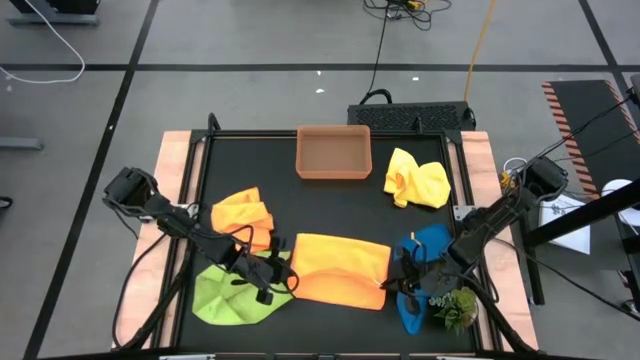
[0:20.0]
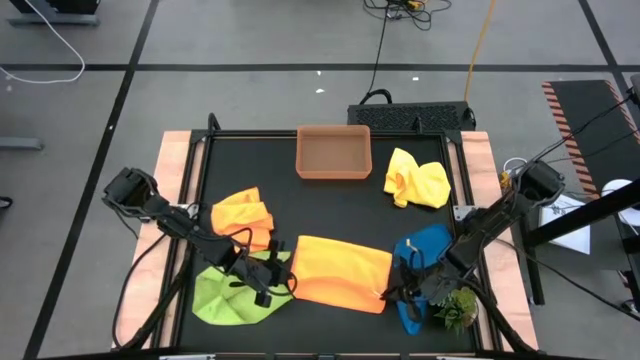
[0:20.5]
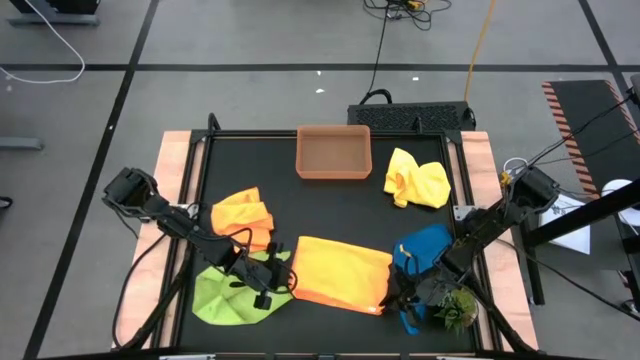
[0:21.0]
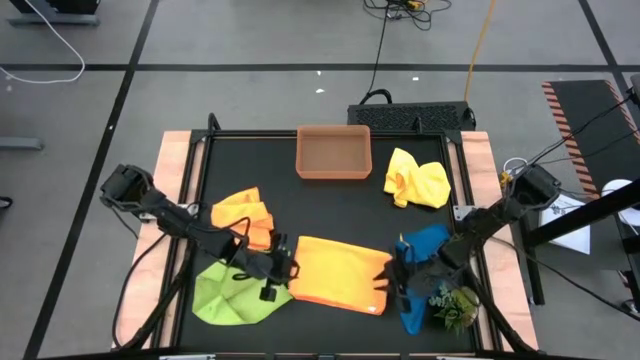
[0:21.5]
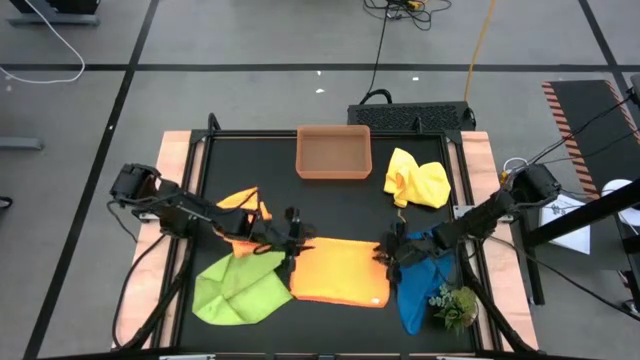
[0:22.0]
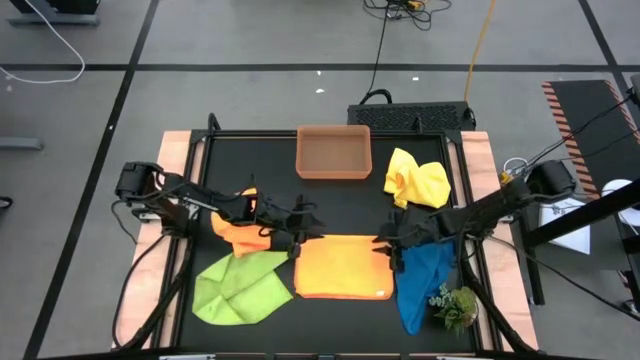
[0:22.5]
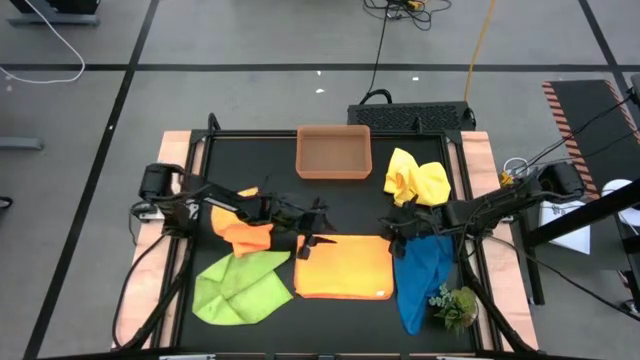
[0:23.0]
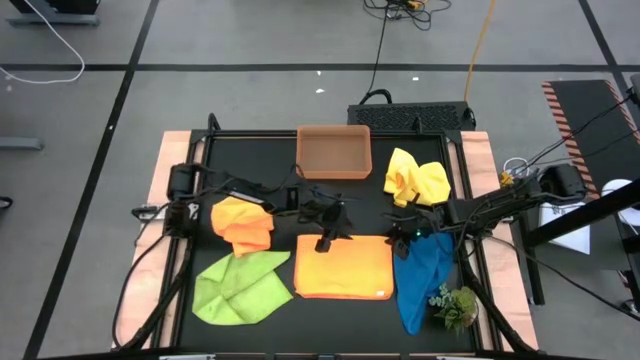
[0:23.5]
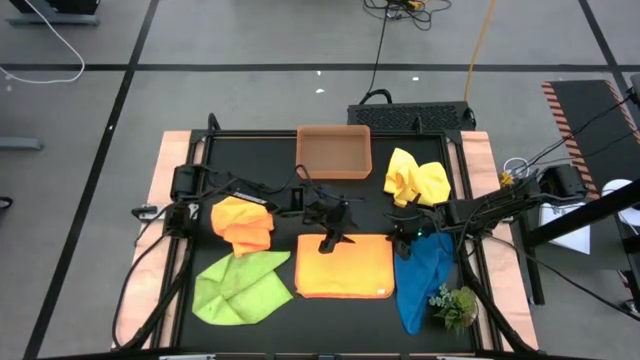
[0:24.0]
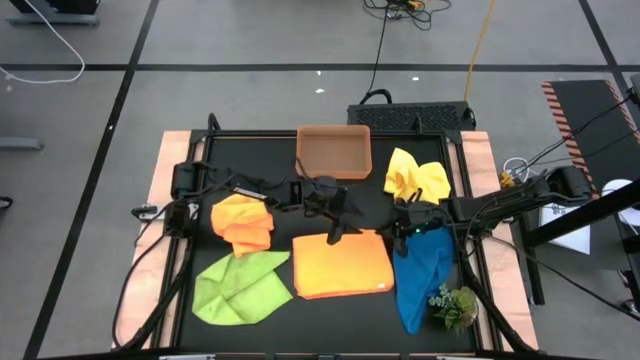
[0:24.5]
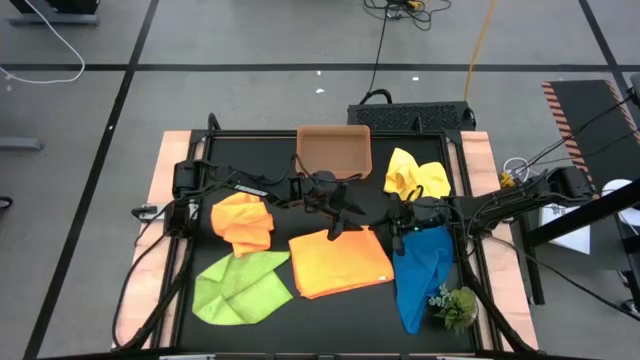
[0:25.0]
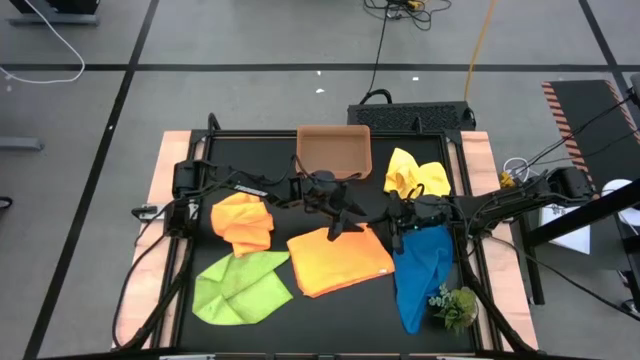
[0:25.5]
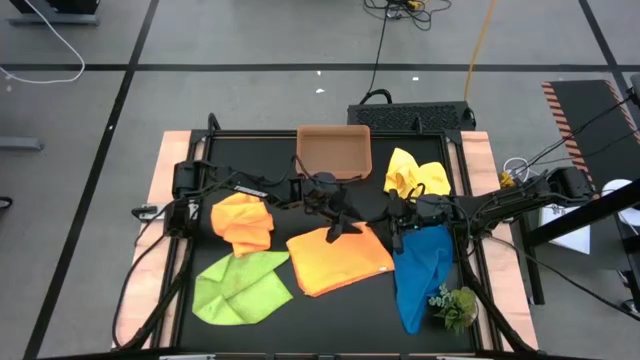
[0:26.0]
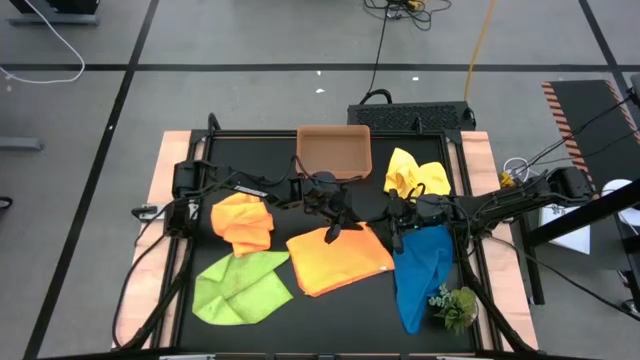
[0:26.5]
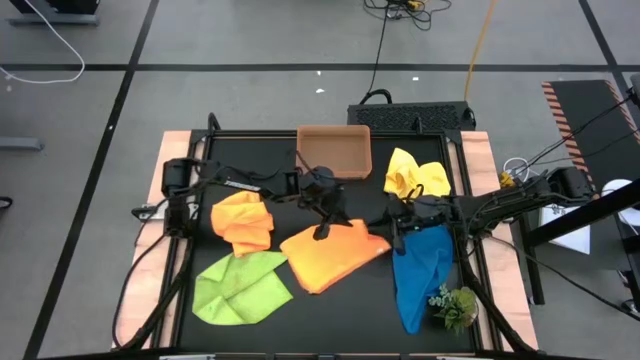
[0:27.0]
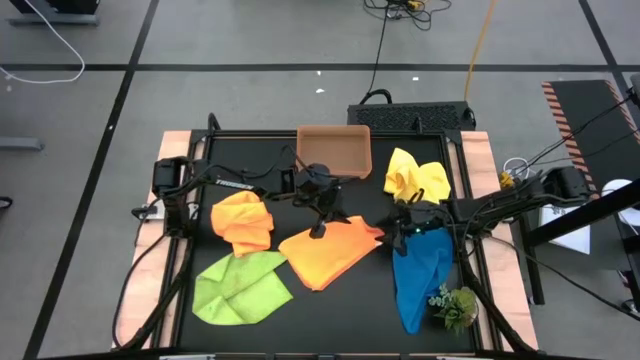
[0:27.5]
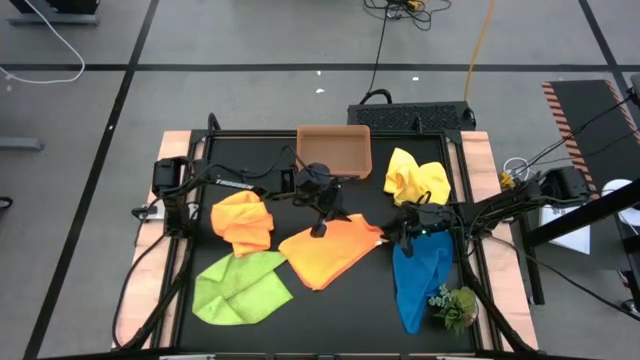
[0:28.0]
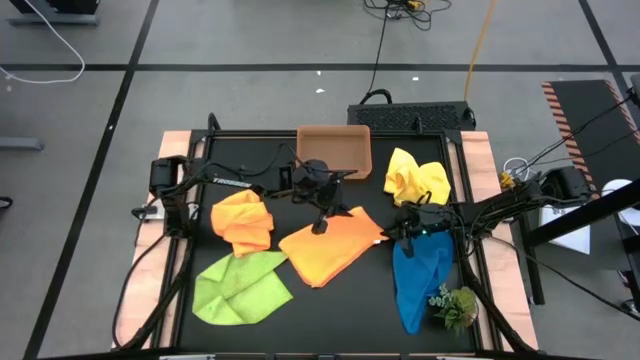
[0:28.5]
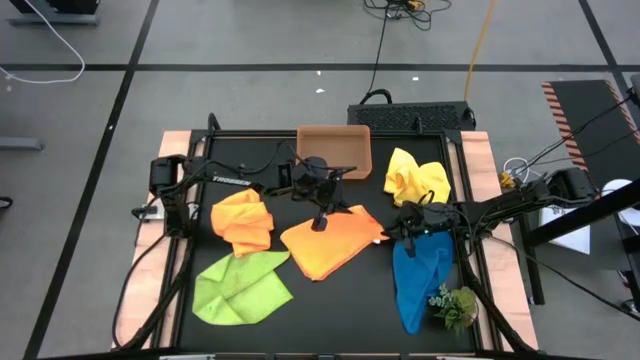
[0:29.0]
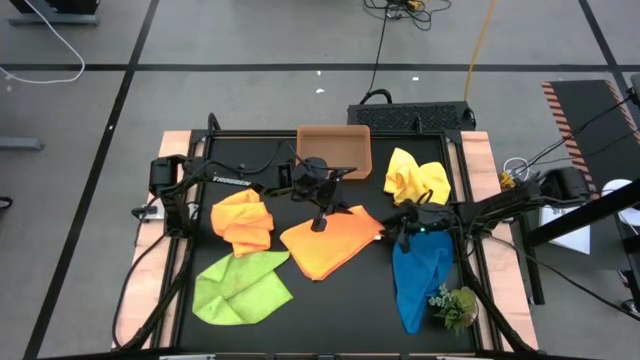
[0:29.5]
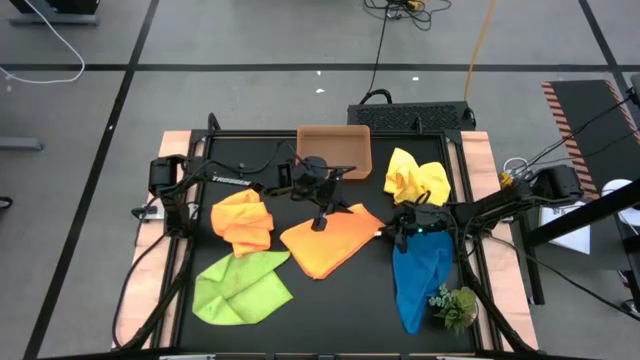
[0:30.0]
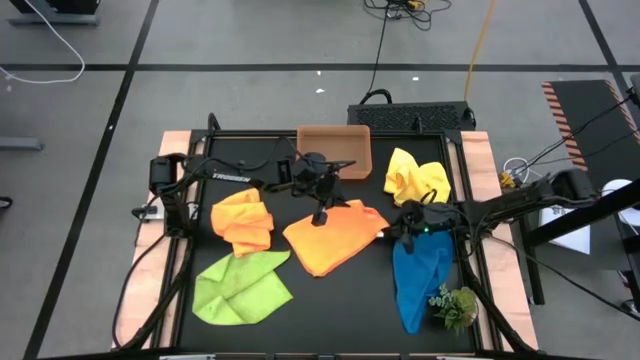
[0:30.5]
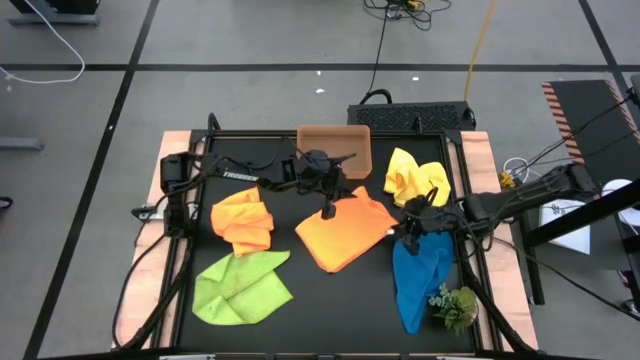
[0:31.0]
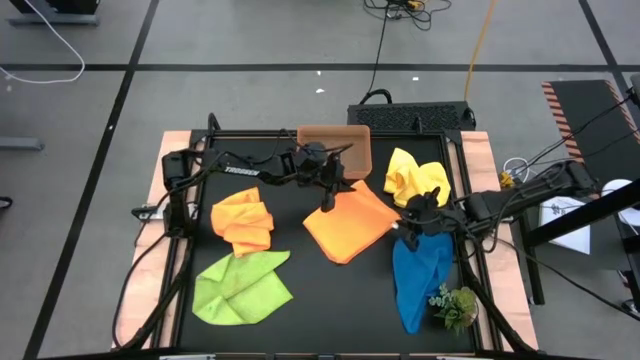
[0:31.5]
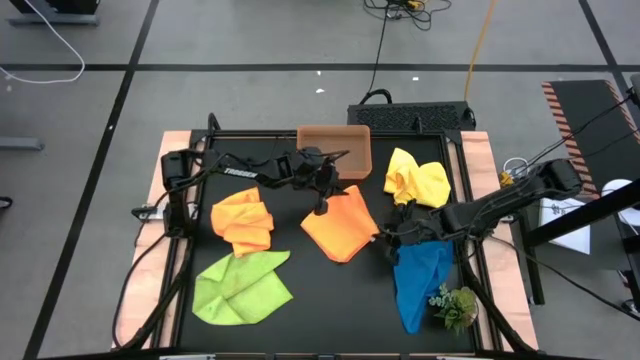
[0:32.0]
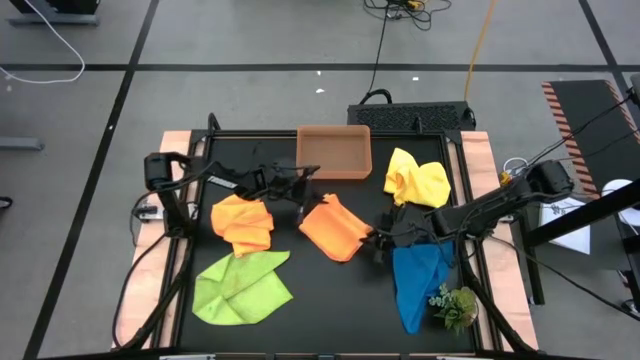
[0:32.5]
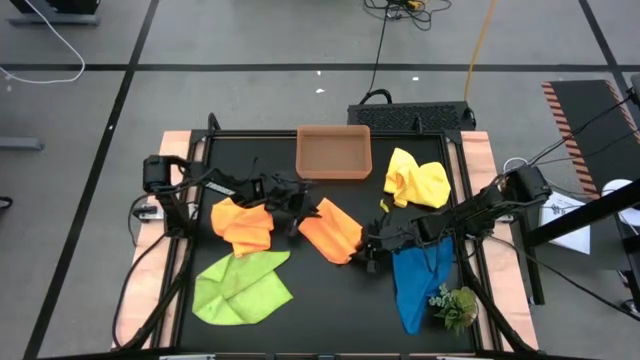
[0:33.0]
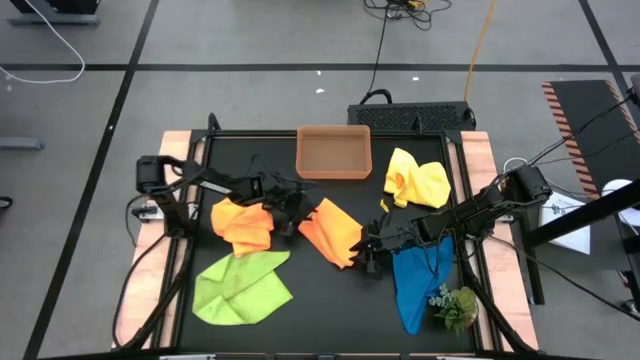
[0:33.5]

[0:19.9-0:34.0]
Task: Fold microfiber towels
Fold the right orange microfiber towel

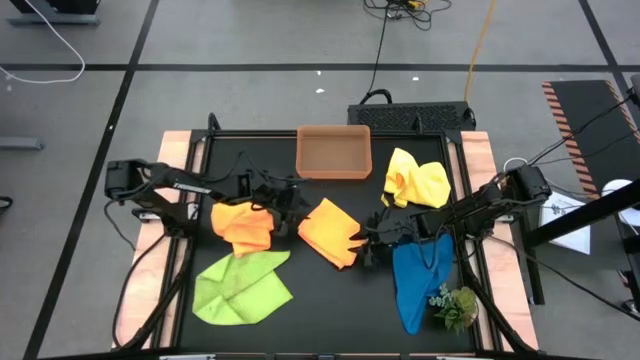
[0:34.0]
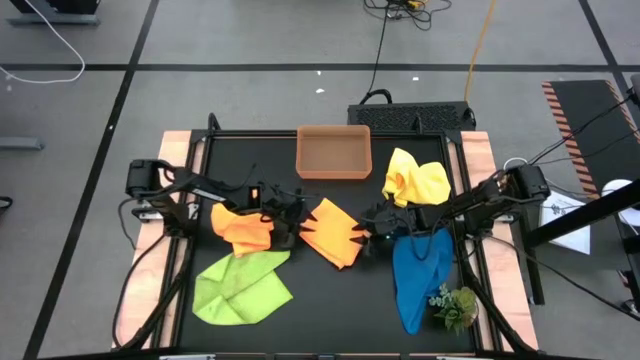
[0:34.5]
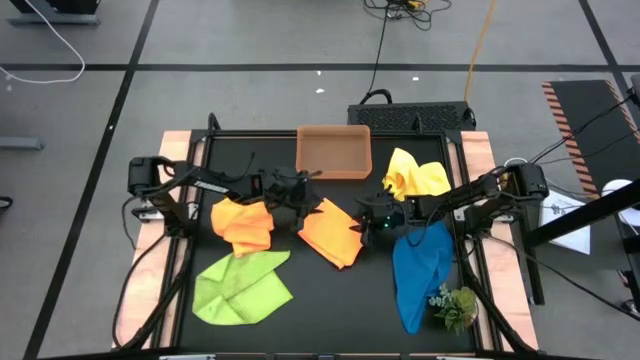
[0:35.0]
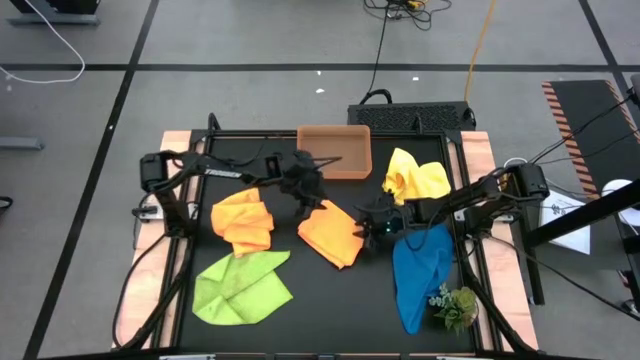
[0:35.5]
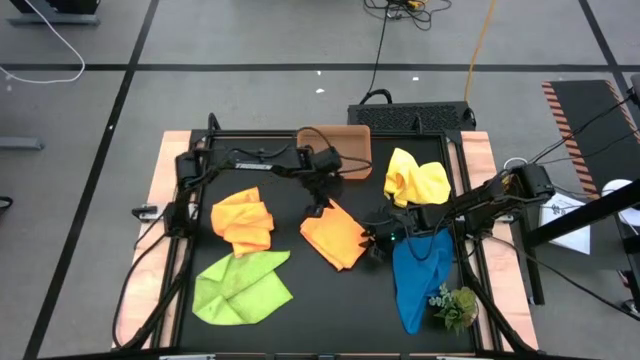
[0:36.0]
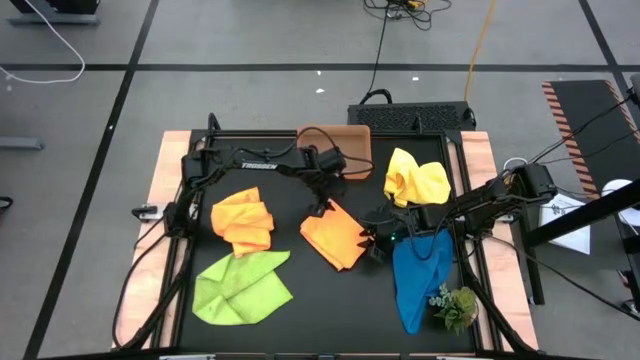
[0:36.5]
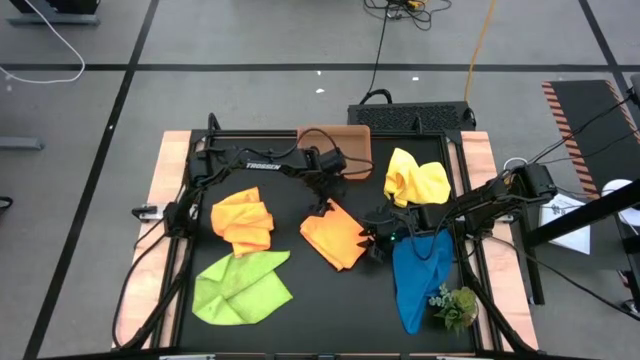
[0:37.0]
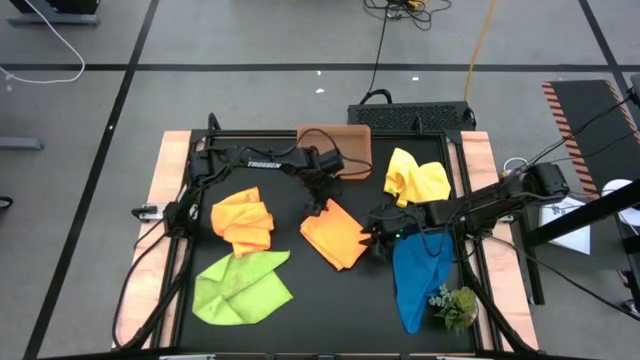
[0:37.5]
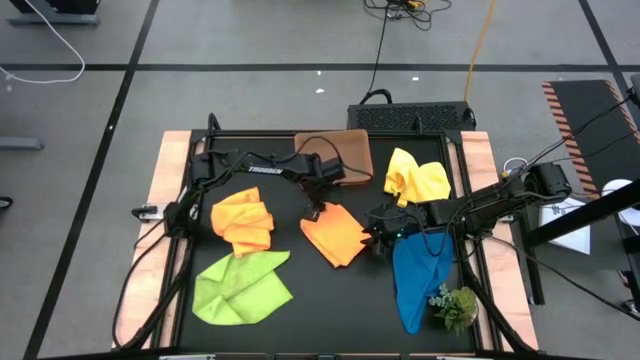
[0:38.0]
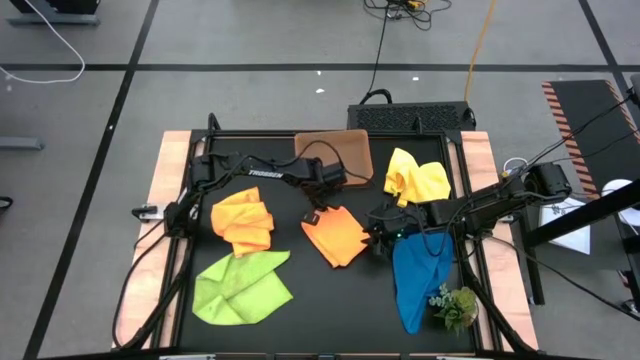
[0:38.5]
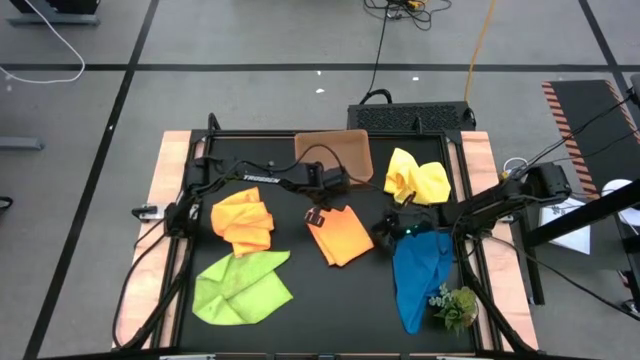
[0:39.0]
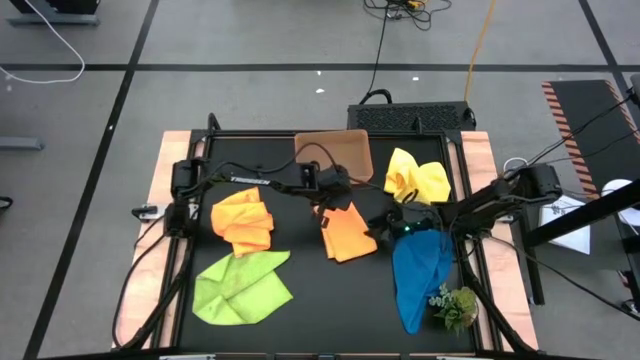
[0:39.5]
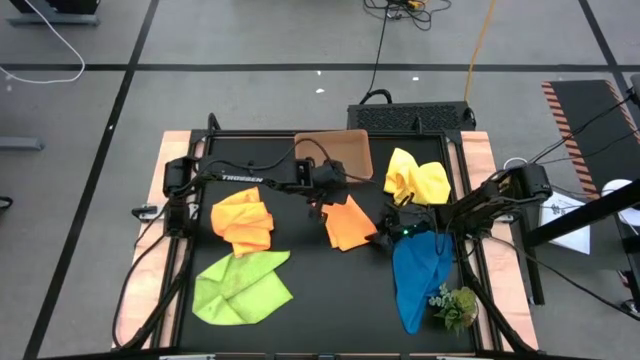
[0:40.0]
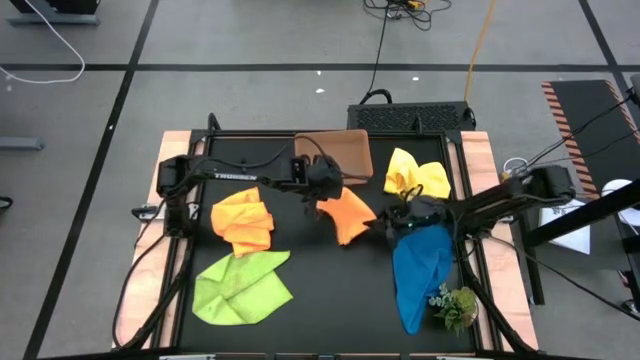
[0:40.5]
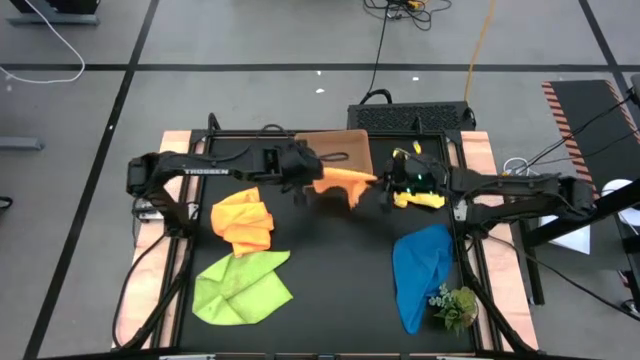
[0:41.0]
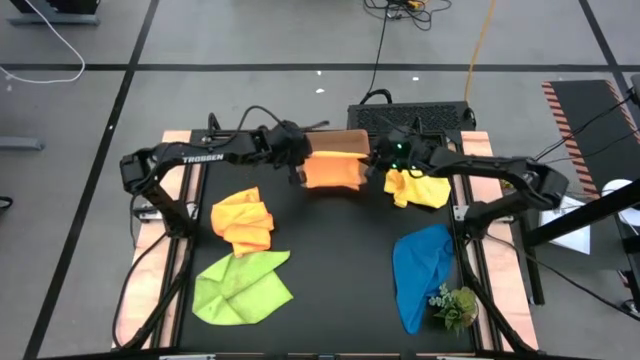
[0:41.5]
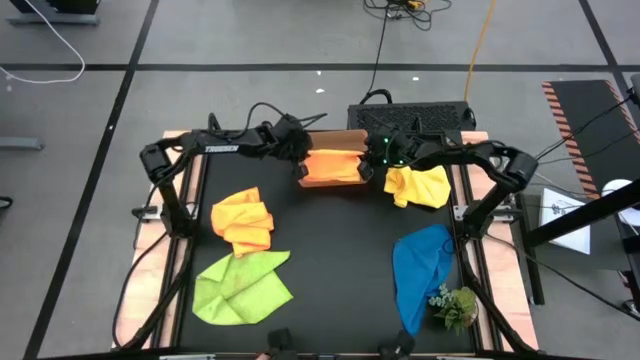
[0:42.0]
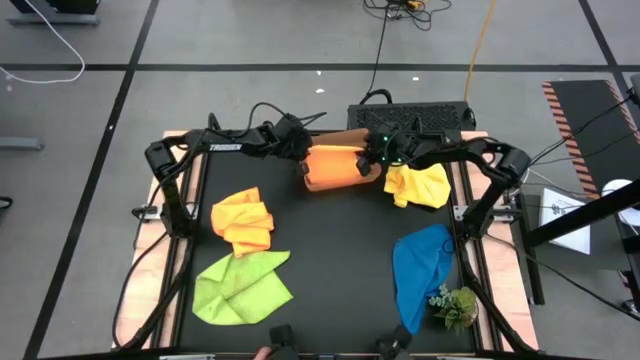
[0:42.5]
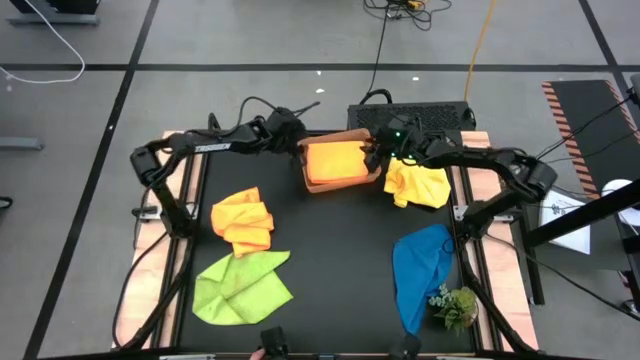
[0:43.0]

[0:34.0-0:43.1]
Put the right orange microfiber towel into the orange bin

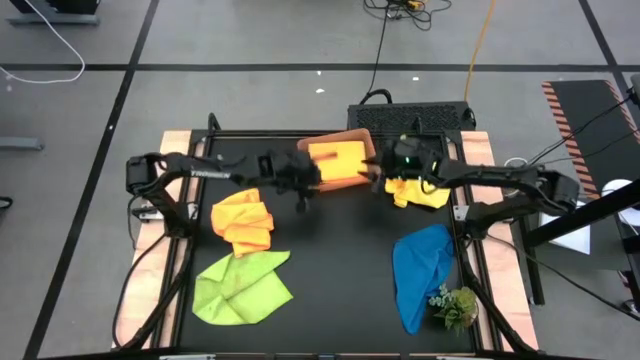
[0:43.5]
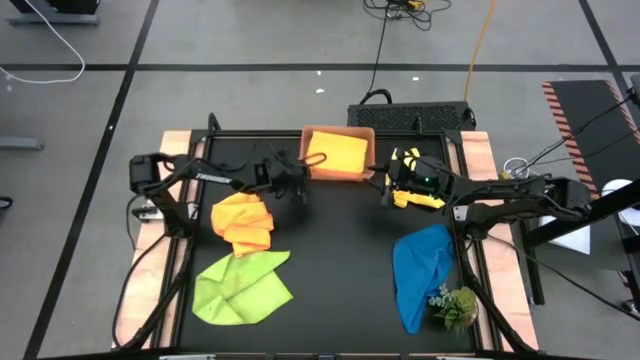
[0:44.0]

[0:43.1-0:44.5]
Adjust the orange bin
